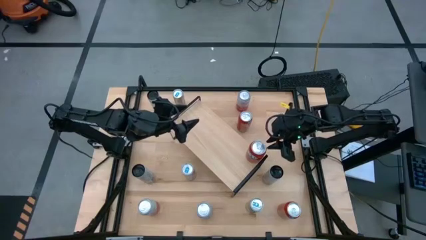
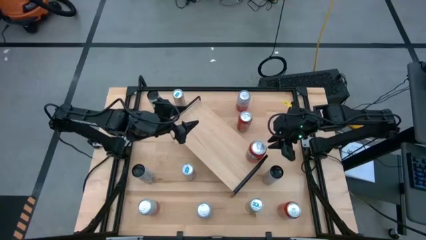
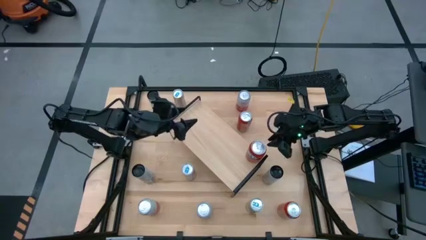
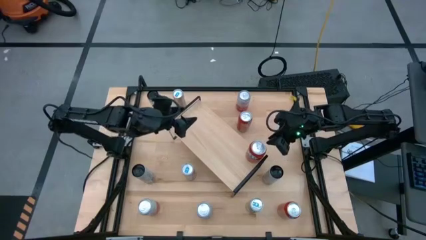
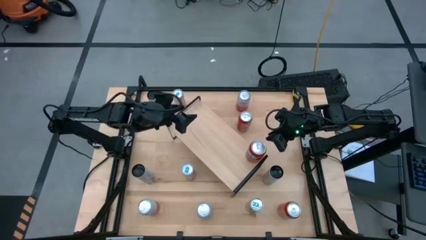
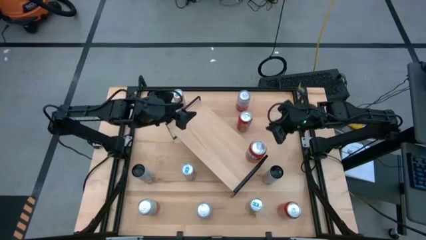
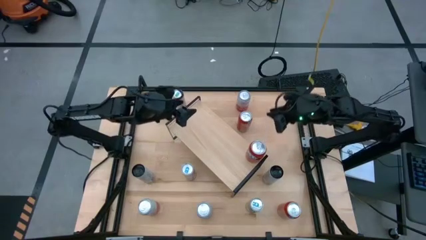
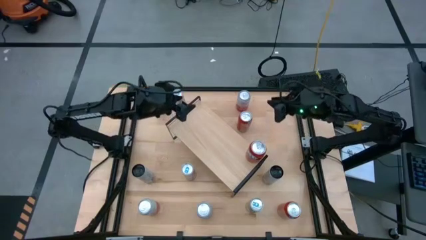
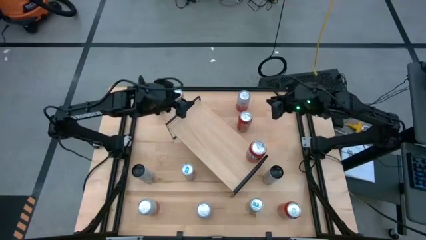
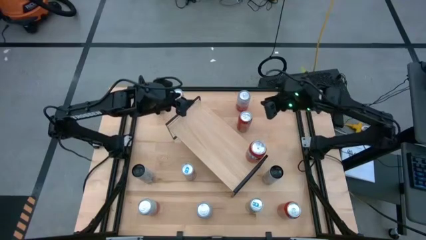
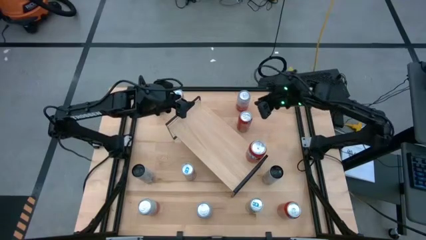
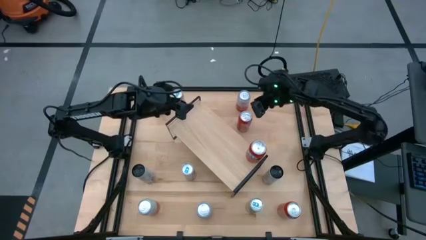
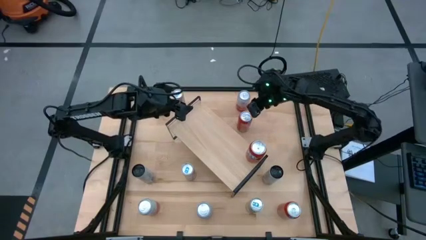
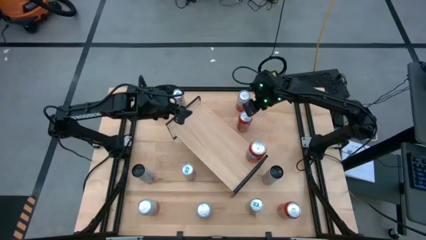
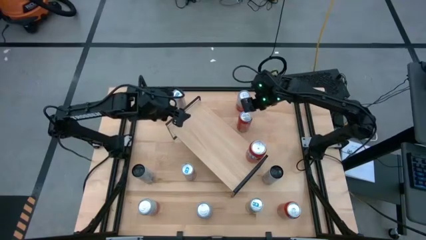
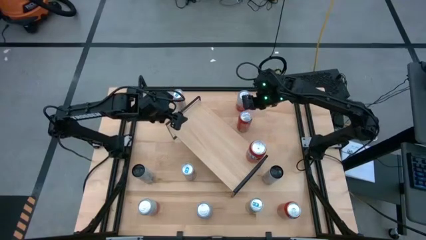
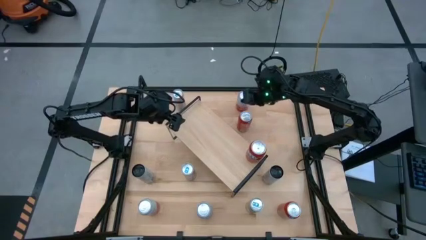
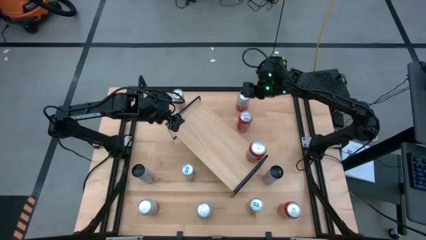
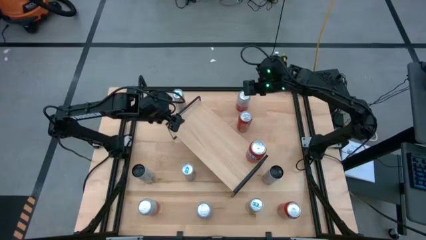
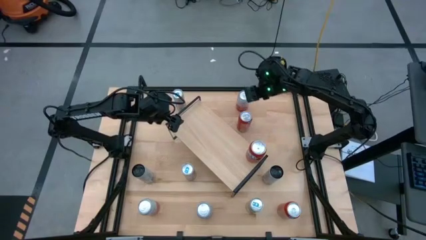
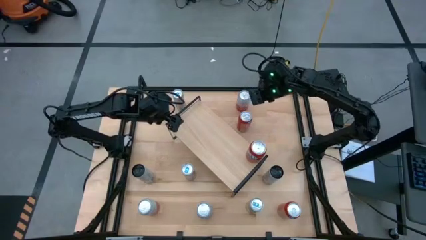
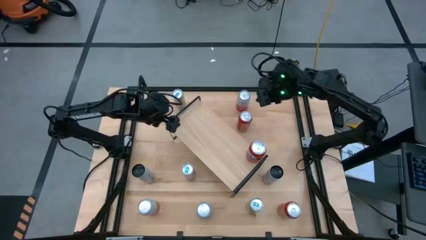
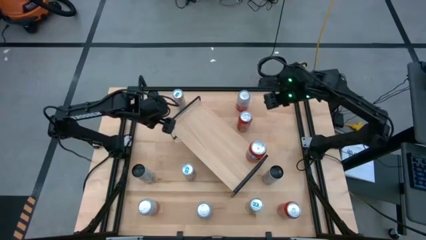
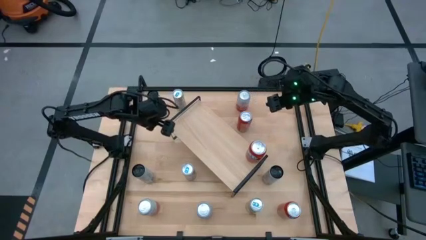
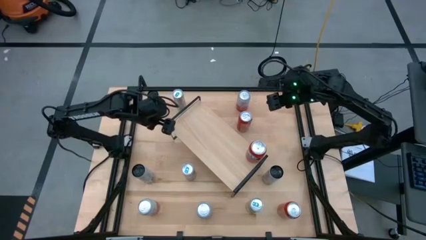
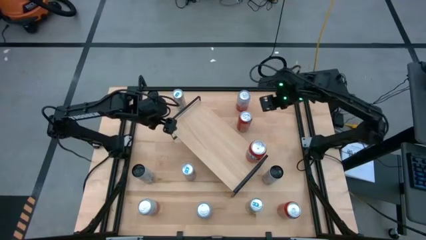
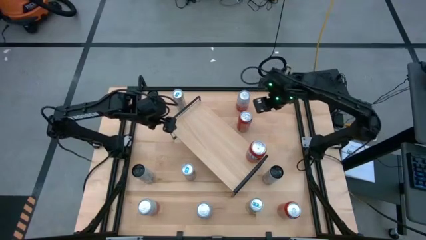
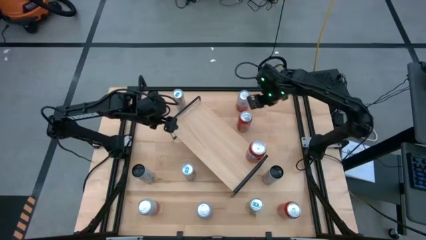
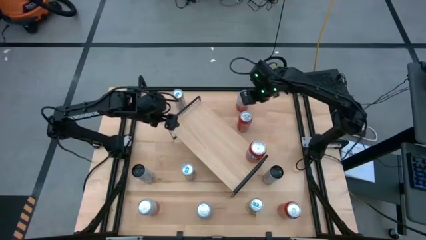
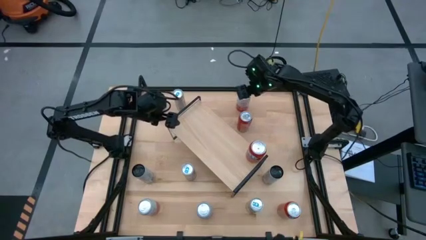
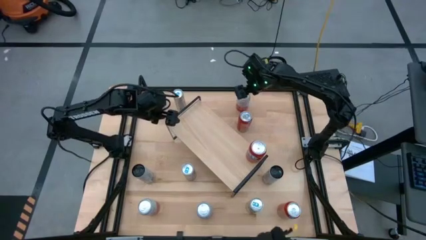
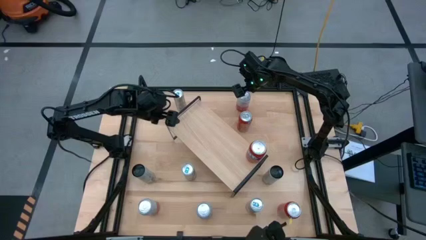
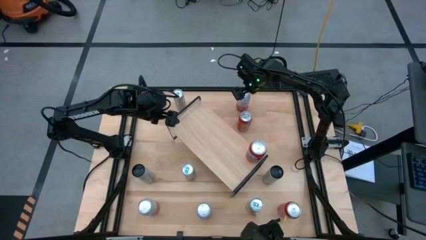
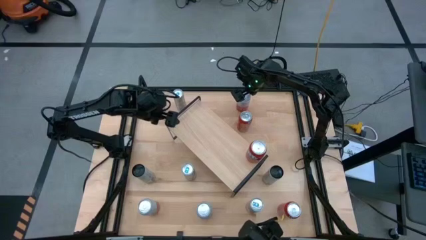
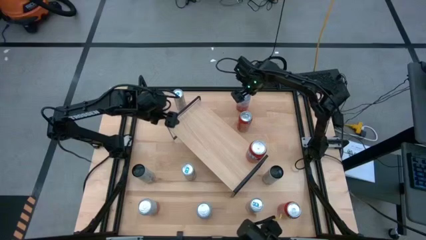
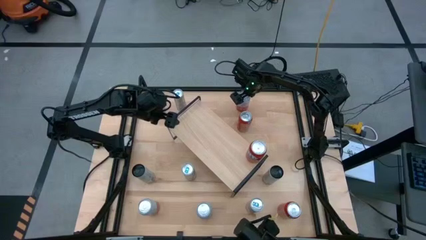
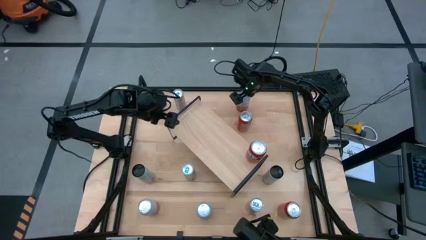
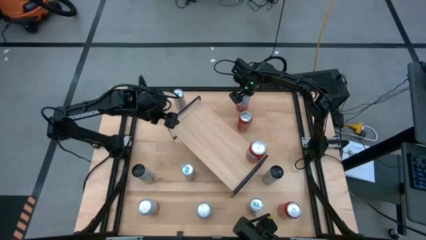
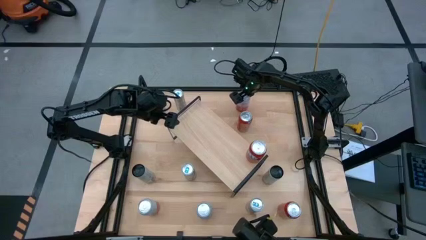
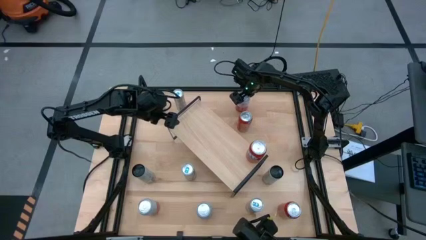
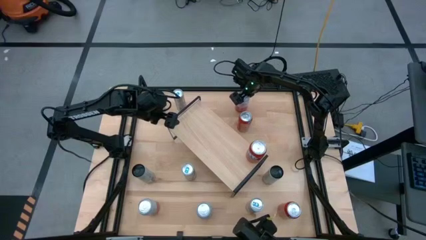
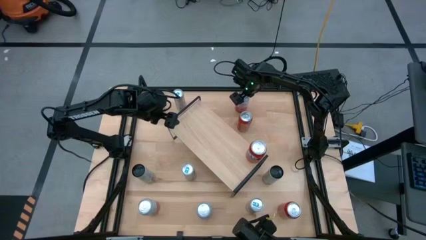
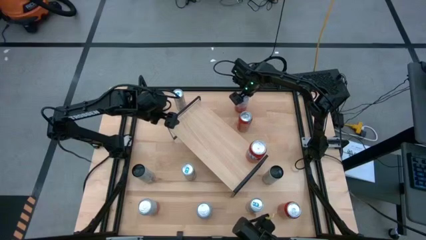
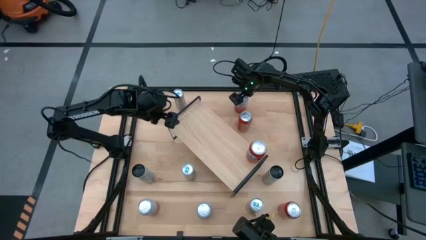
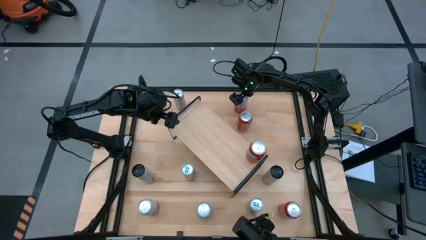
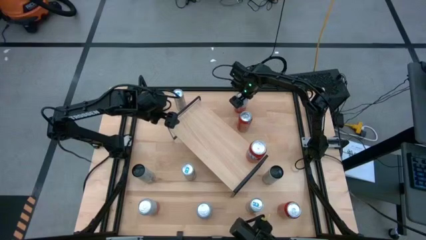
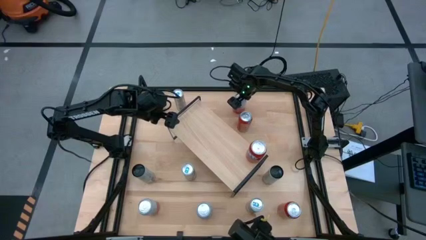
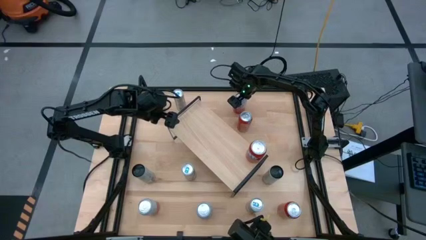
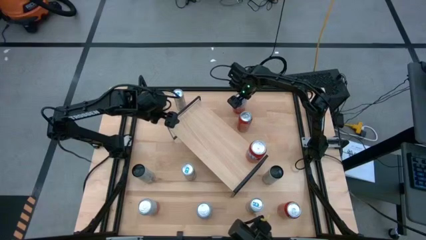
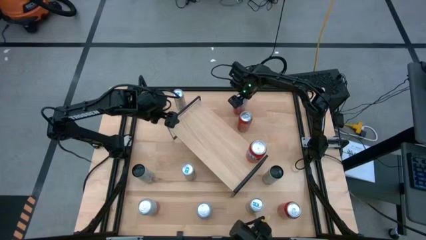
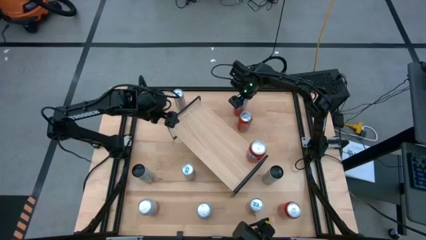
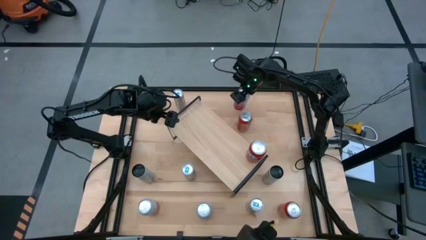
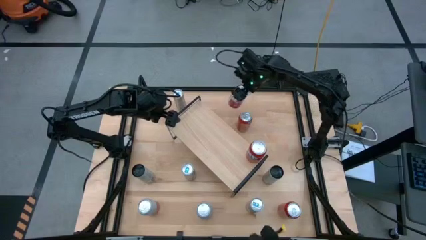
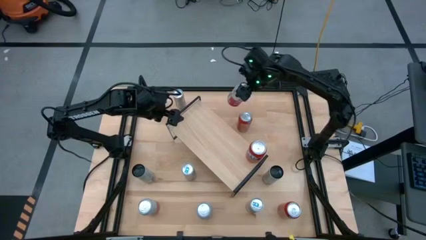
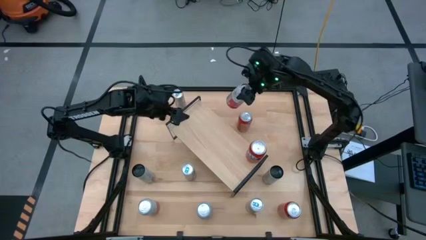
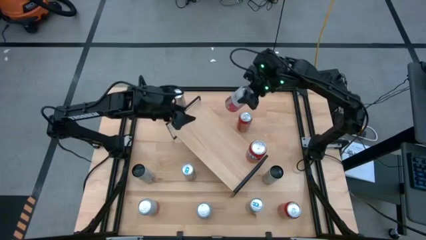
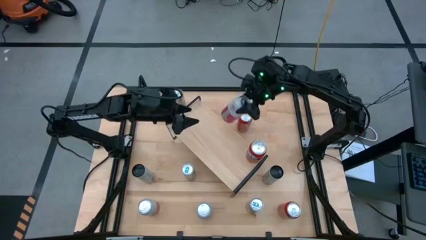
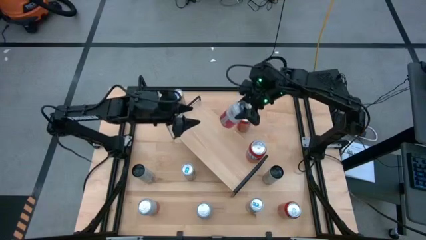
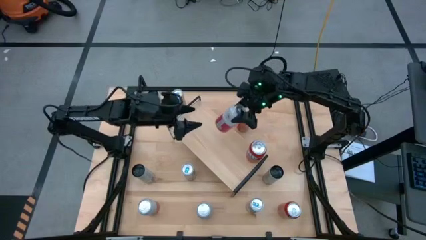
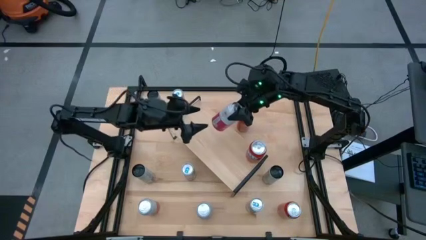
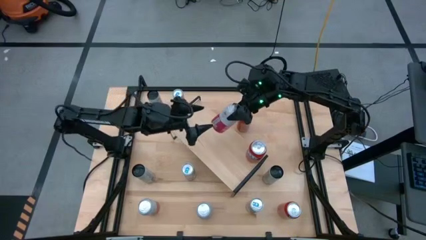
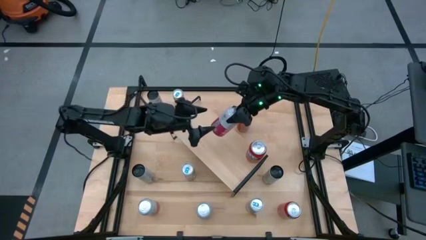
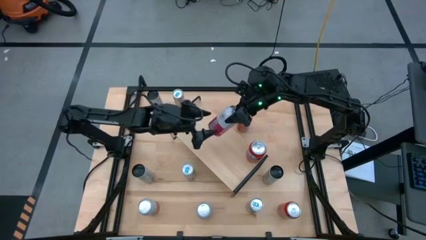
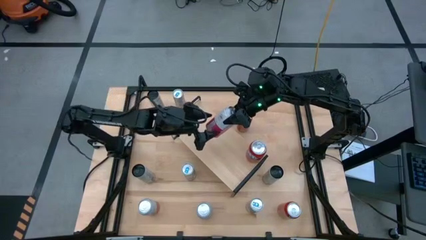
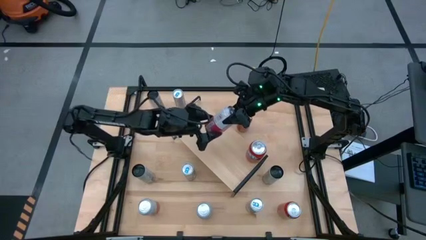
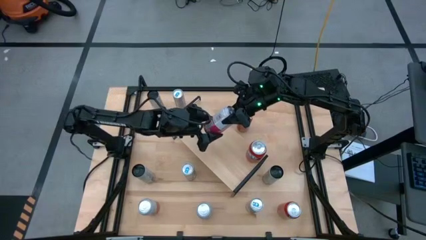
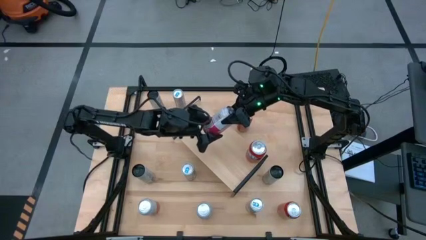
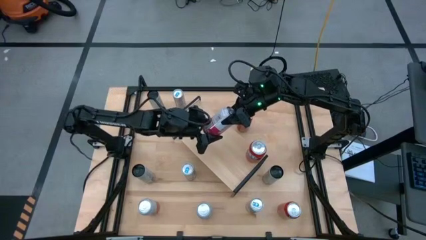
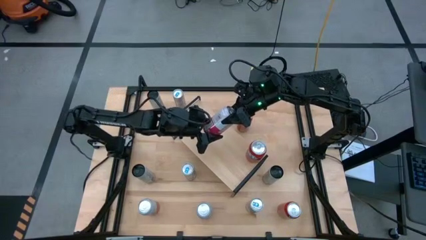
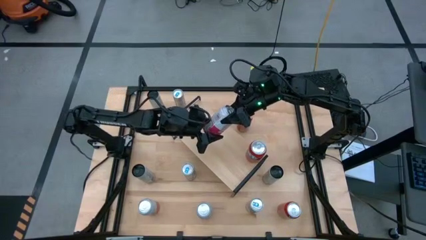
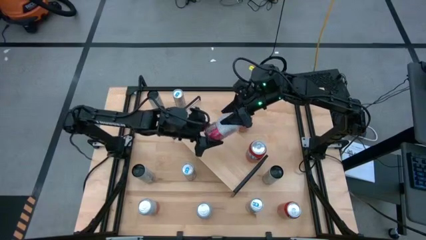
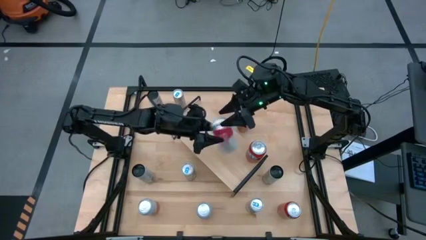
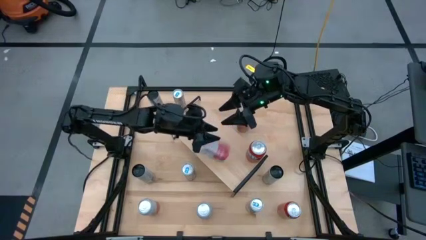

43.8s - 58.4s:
Task: Place canned beverage on shelf
Put the top pink white soda can on the shelf

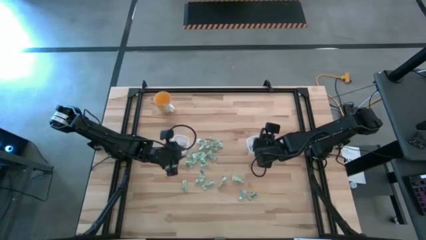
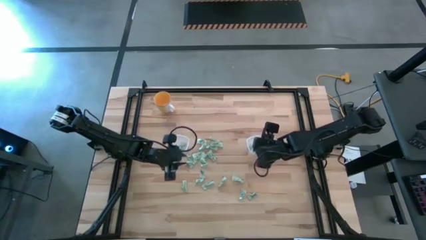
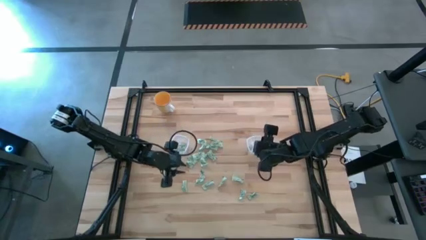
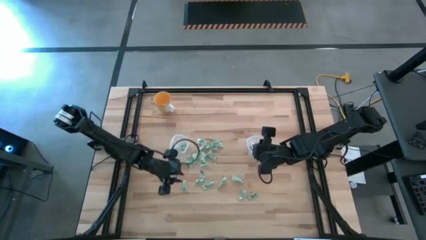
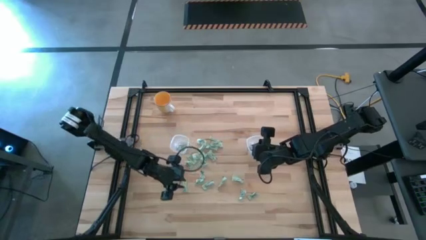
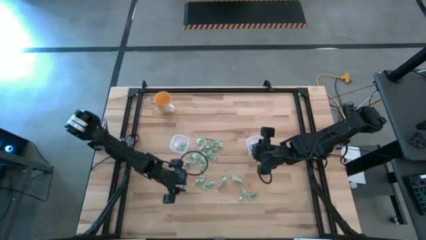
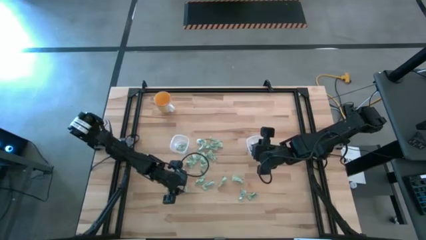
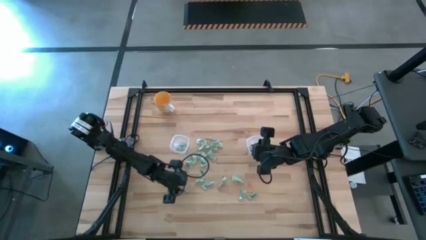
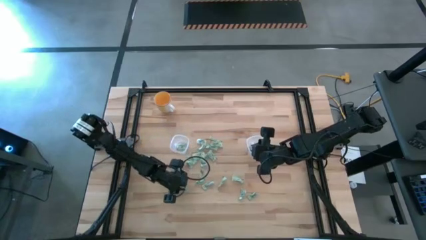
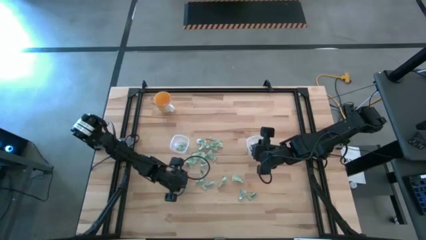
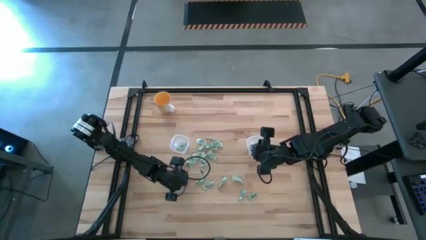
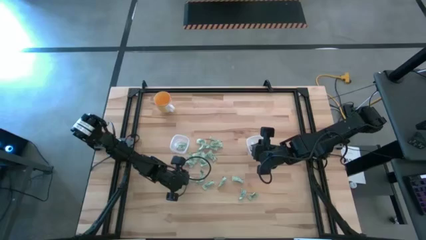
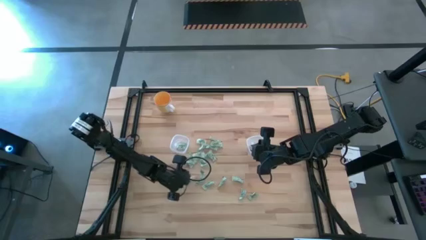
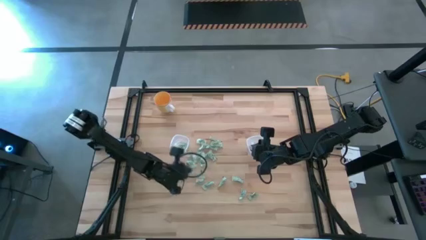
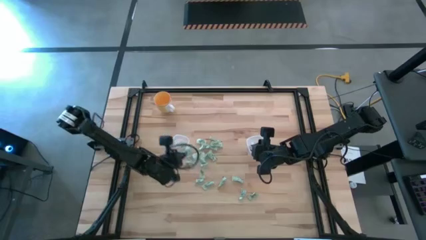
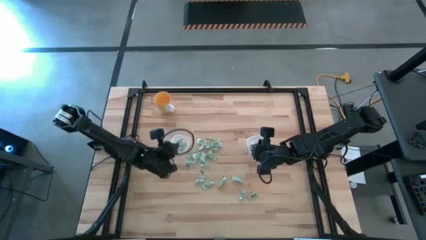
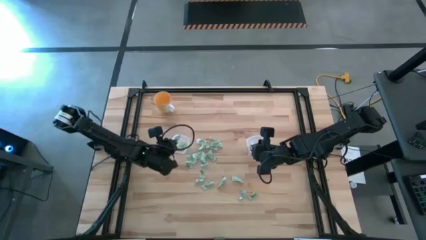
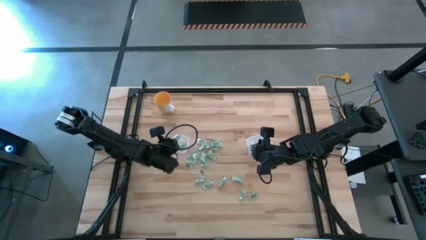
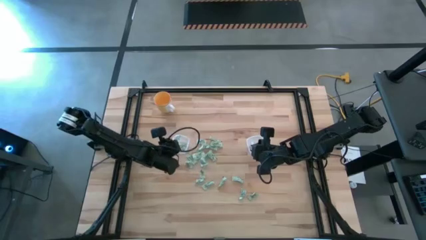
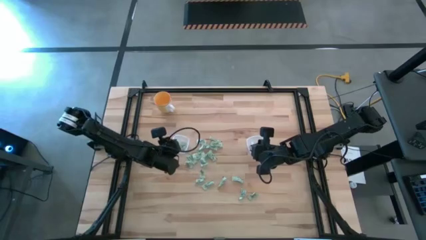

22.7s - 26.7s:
Task: Pick and place Stevia / Truvia into bins
Put the stevia packet into the left transparent container
